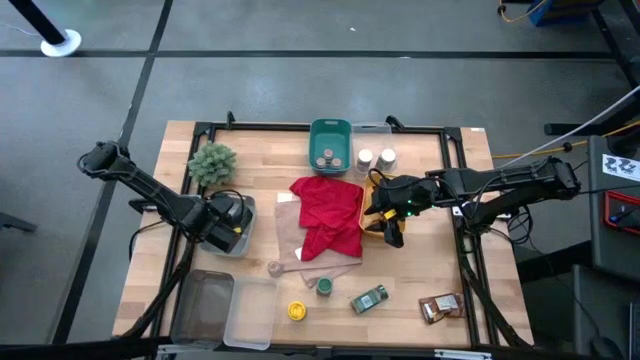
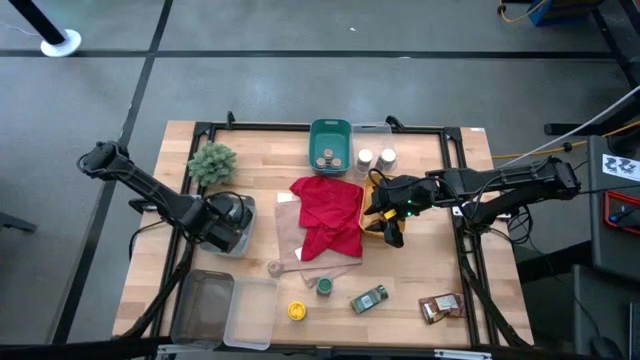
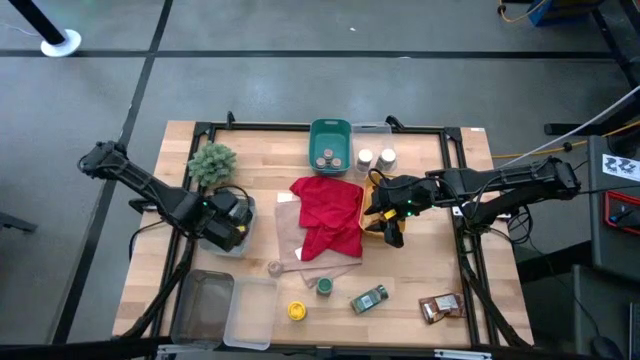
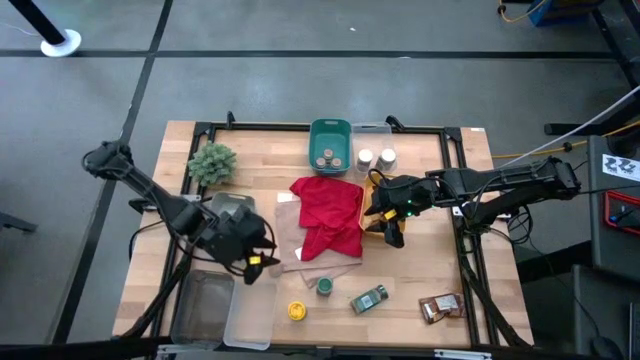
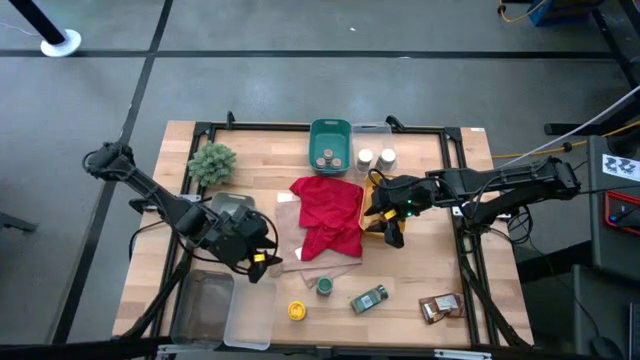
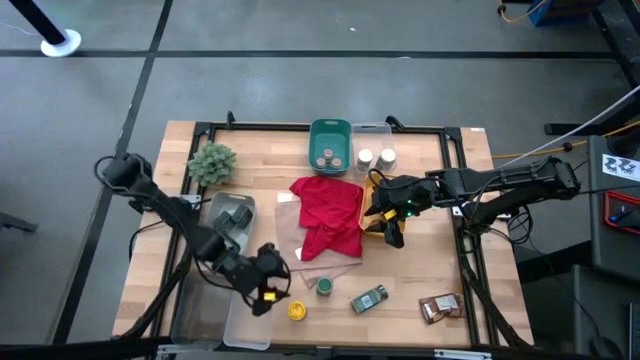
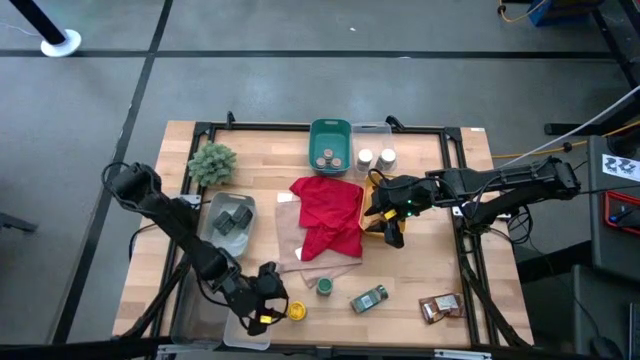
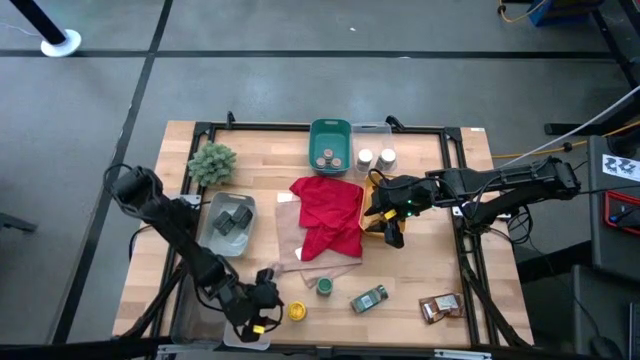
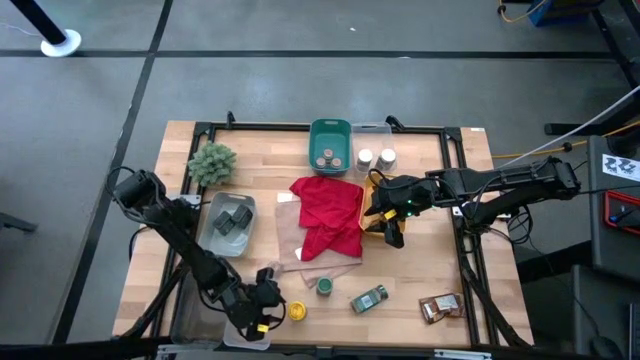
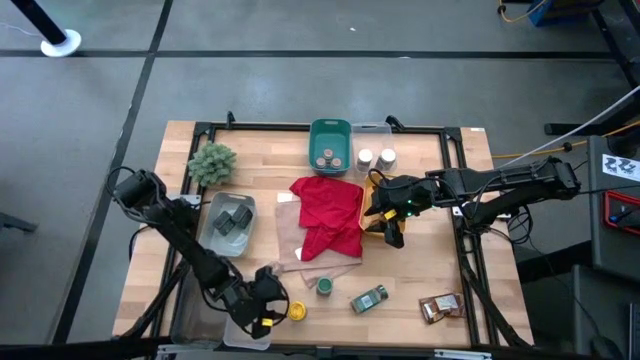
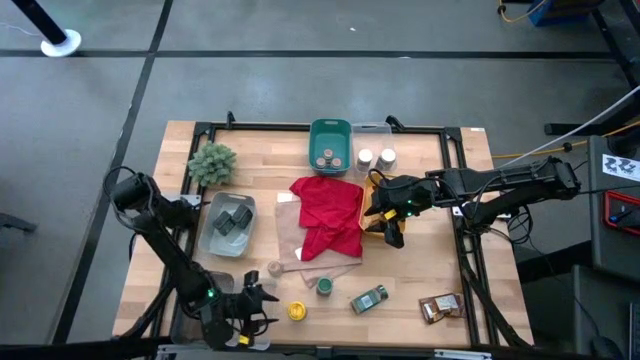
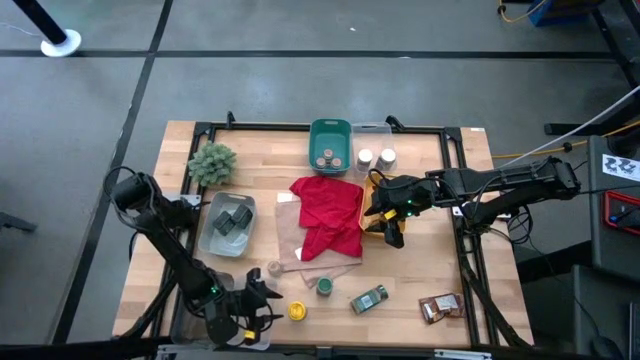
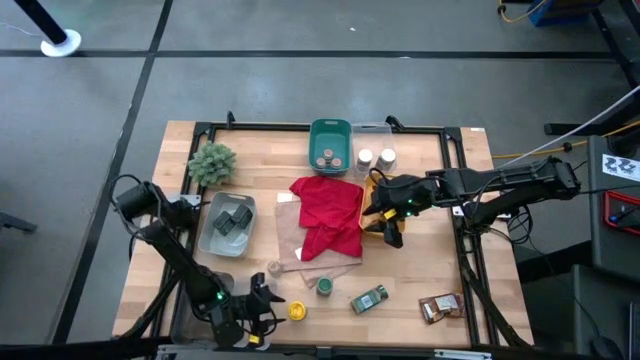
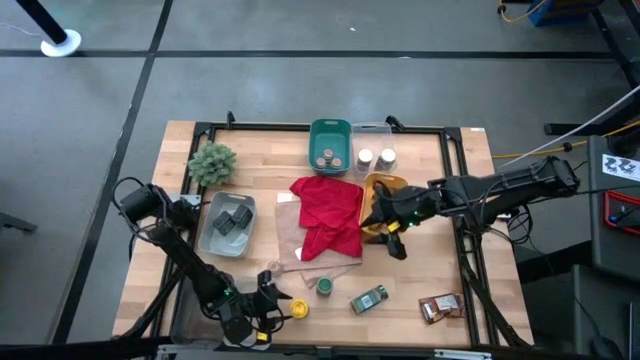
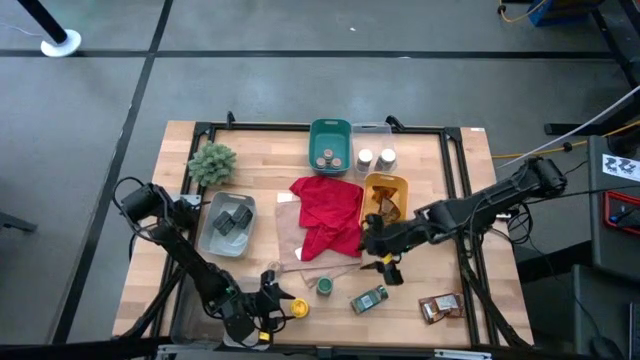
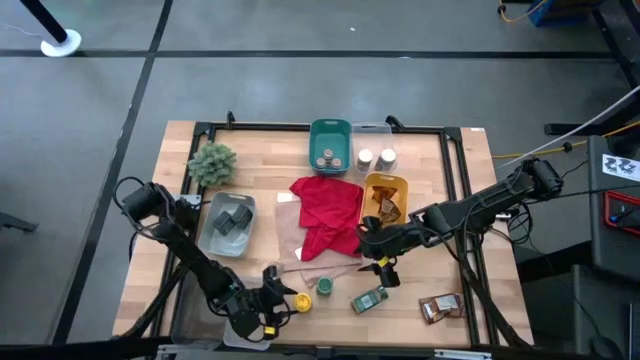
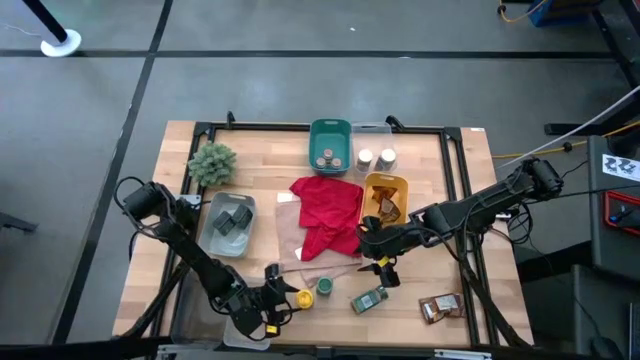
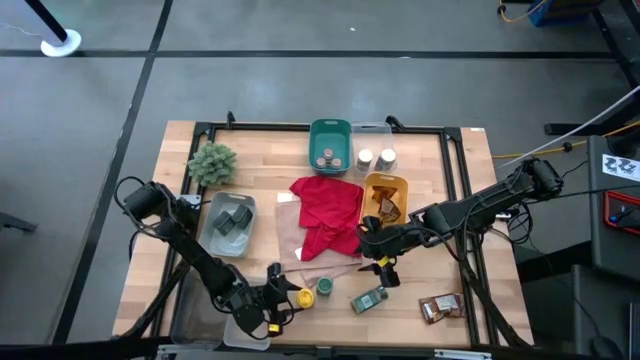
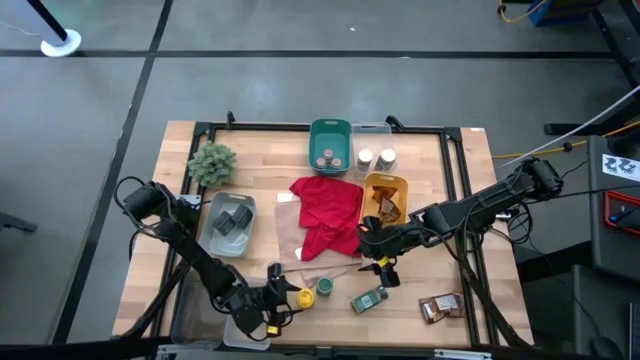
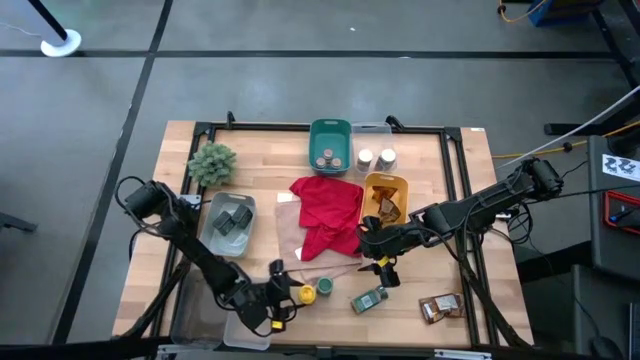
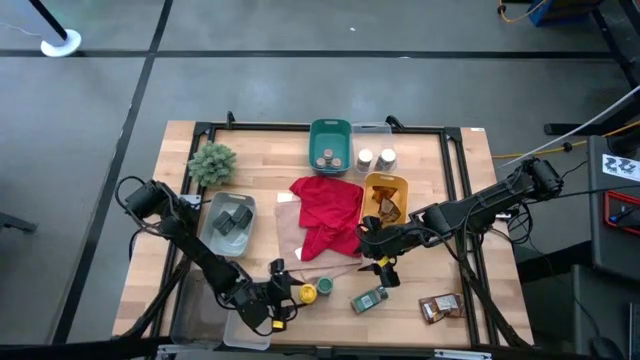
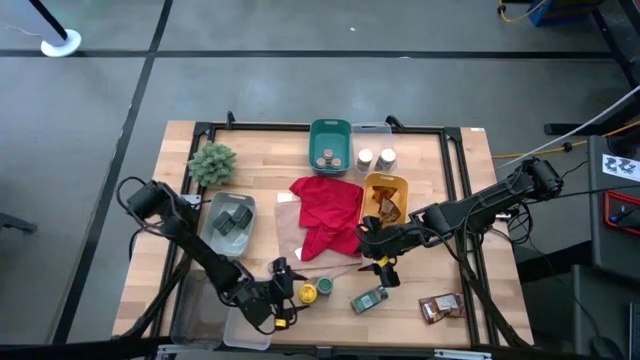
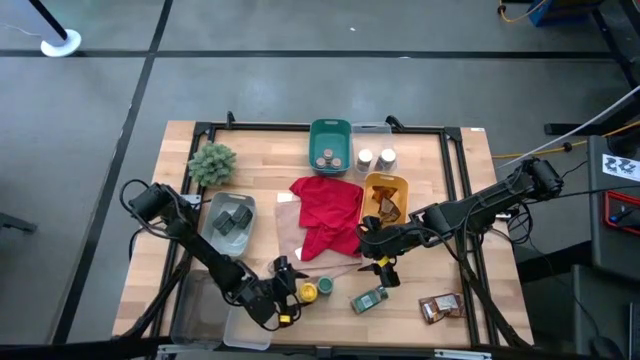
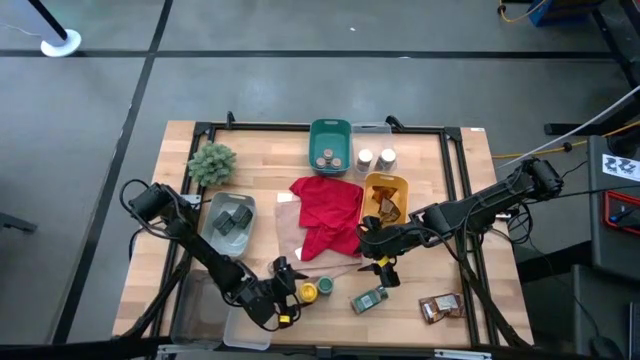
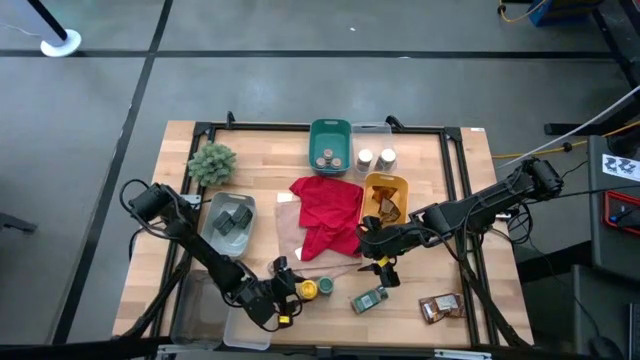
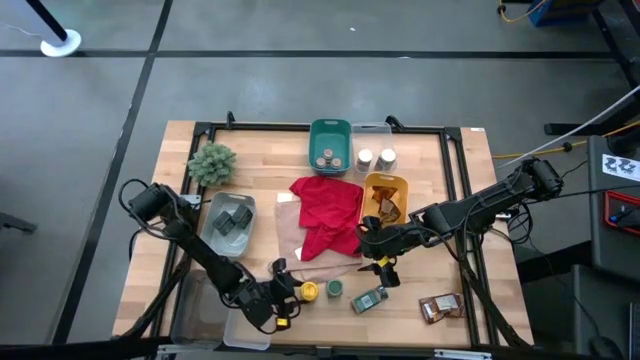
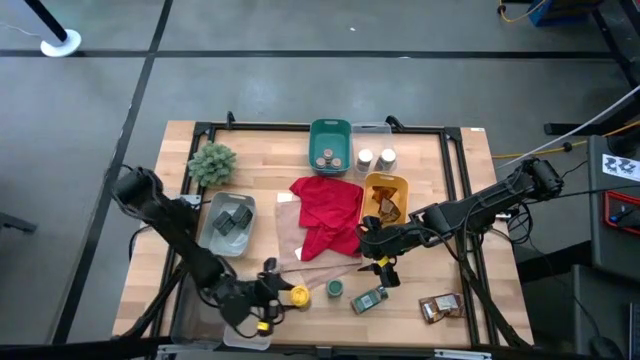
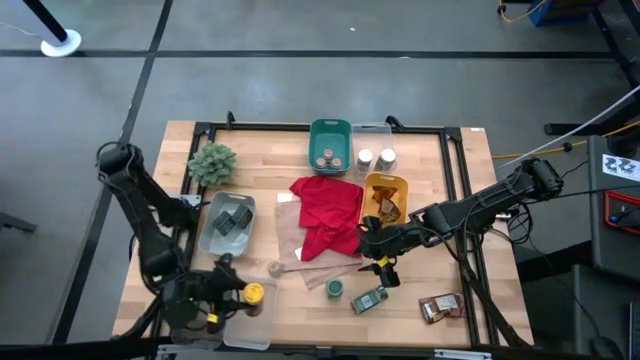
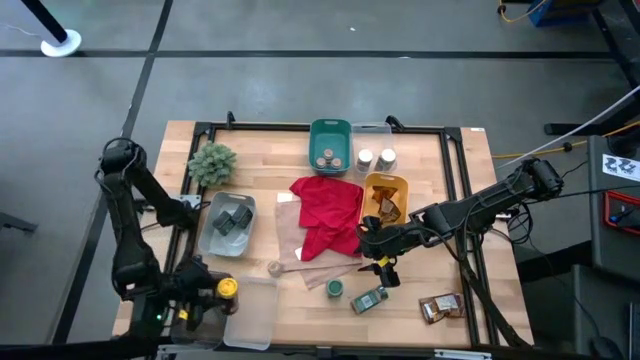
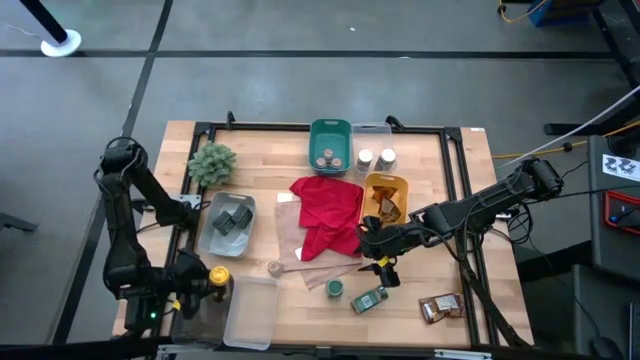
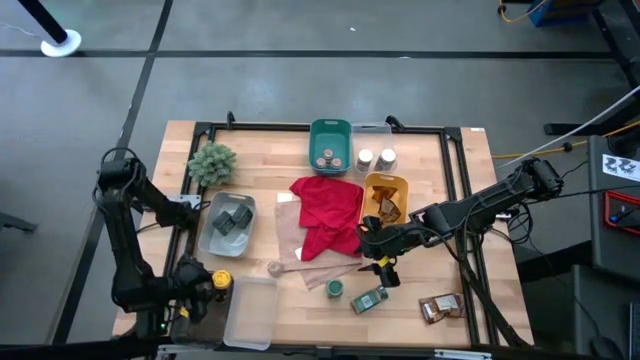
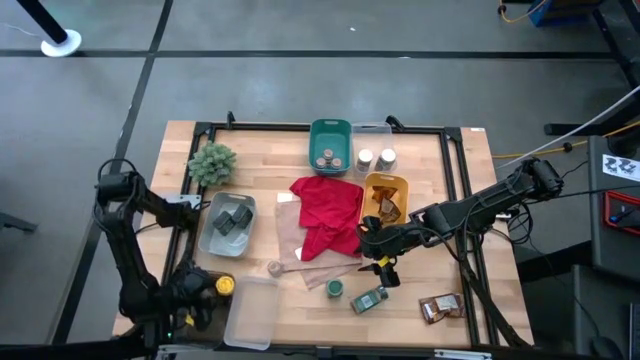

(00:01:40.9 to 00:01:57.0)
Task: Sort spices by type
Put the yellow seasoning bottle into the black bin

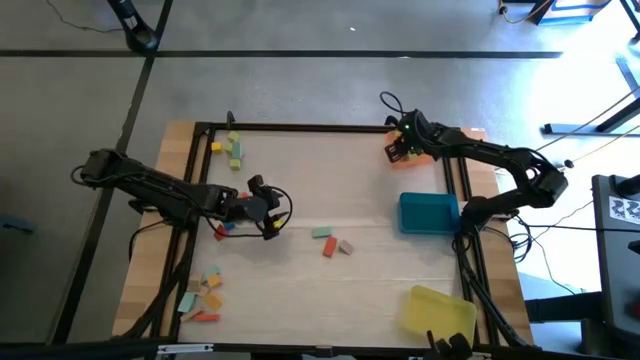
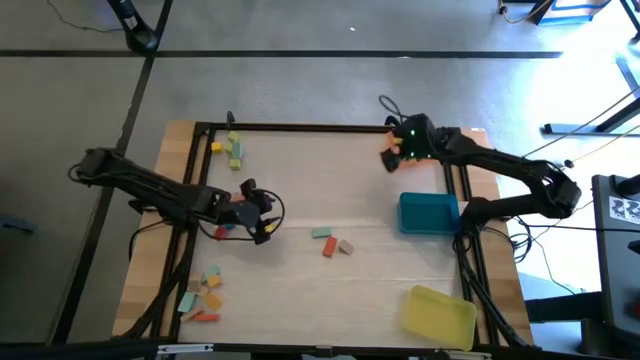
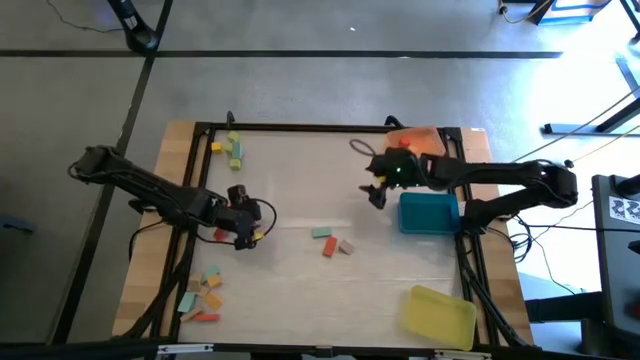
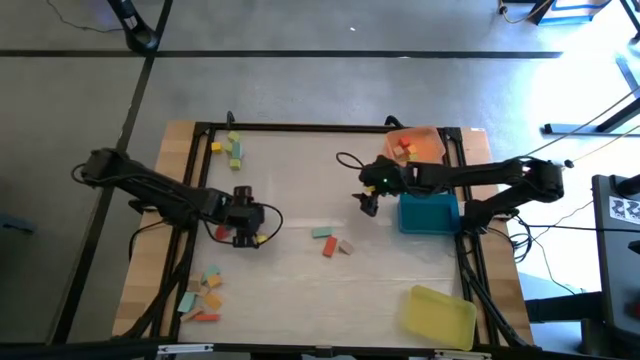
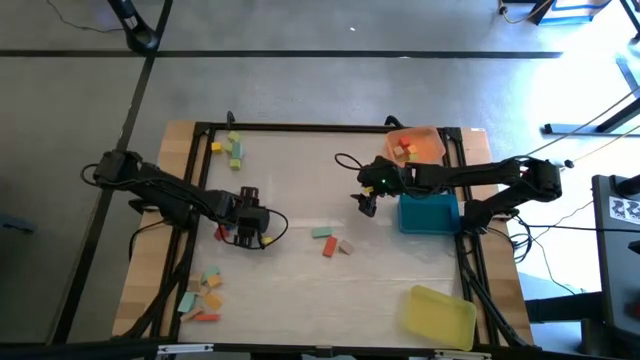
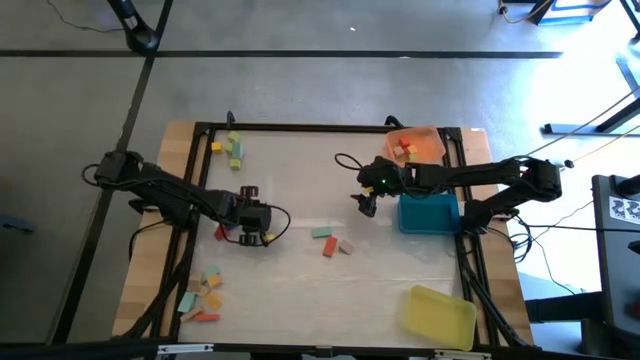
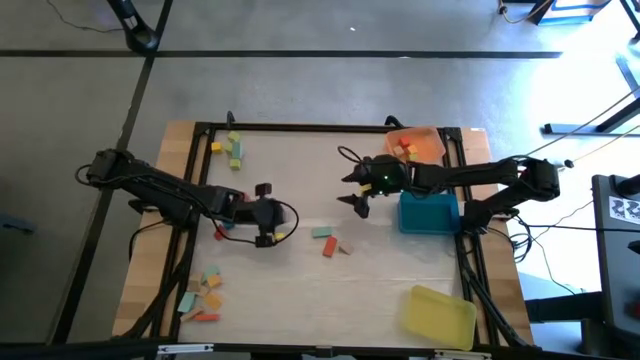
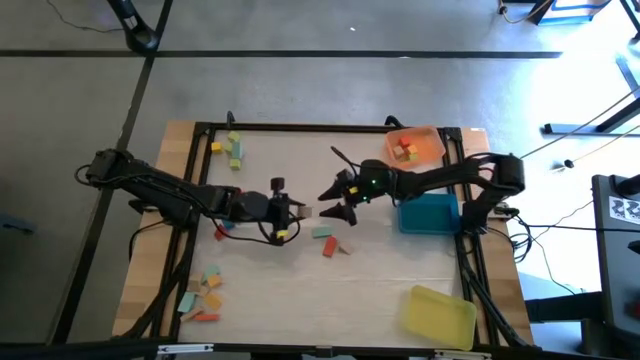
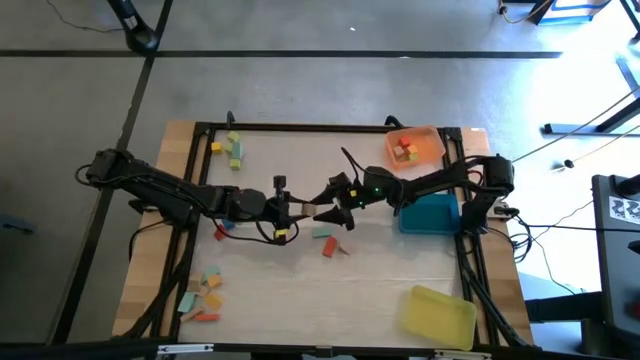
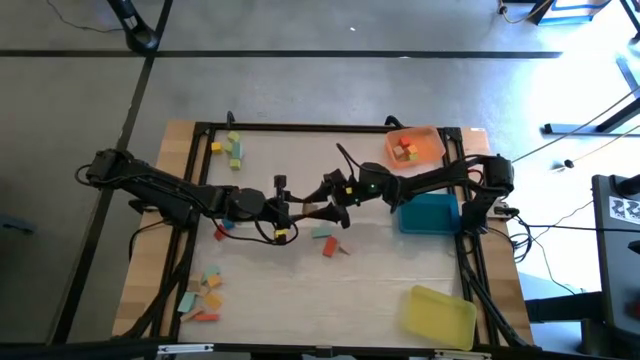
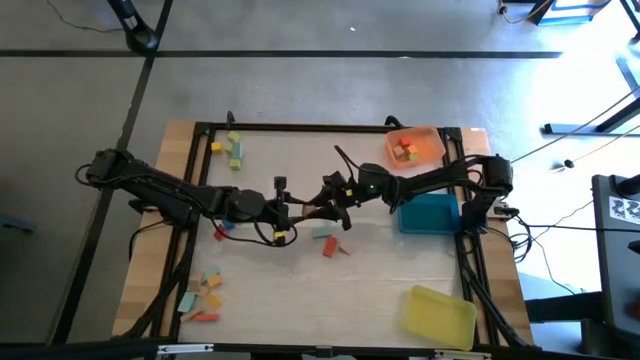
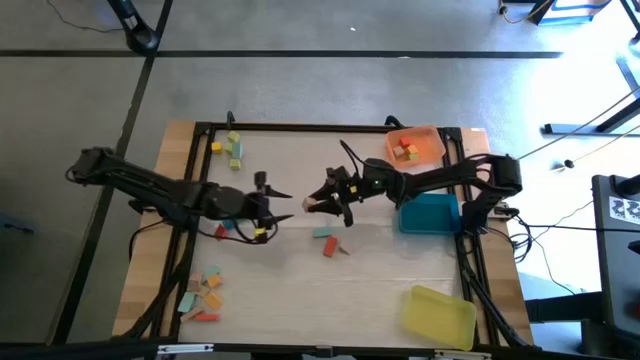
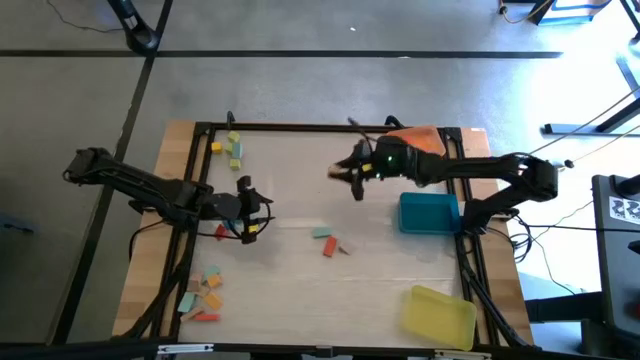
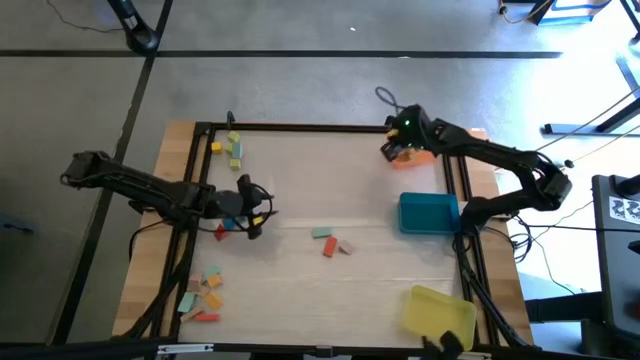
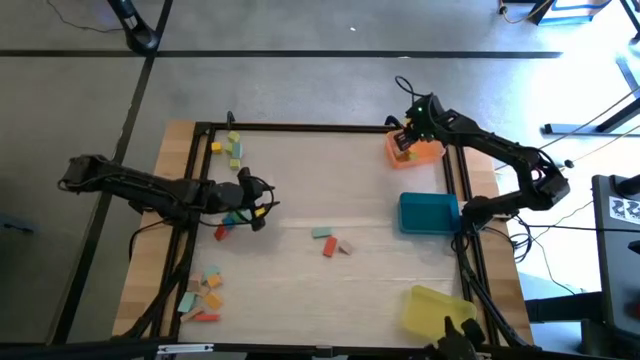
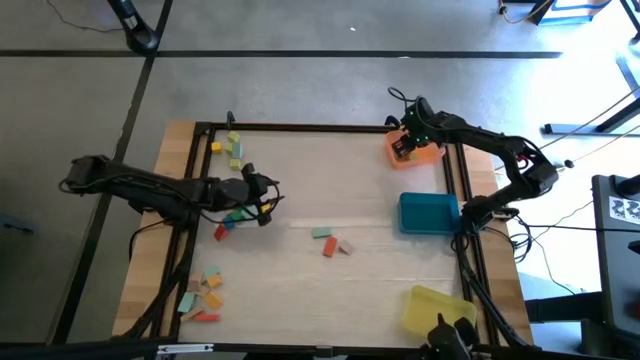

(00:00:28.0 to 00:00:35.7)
Task: Sort blocks by size
Put the brown cube block into the orange bin
